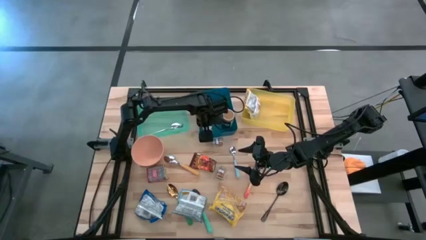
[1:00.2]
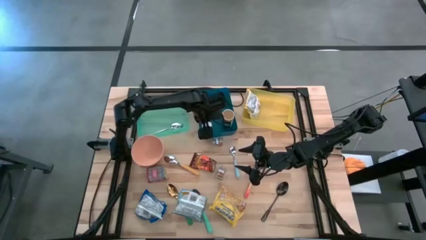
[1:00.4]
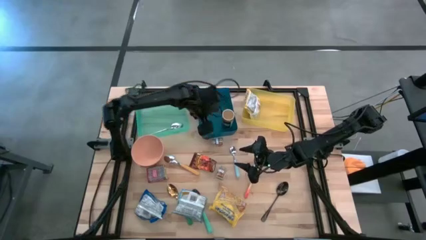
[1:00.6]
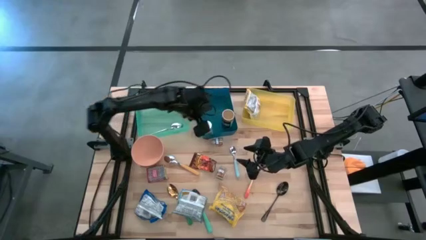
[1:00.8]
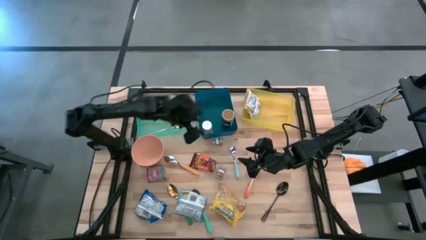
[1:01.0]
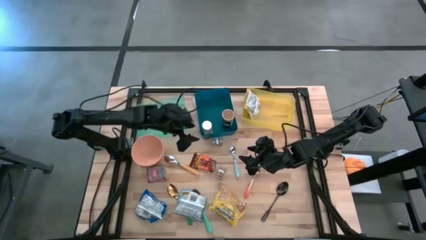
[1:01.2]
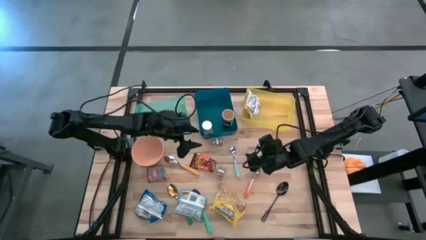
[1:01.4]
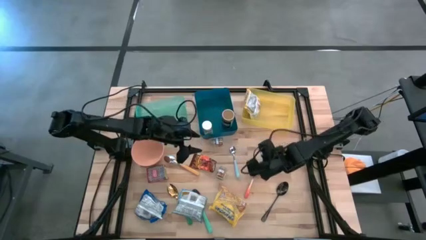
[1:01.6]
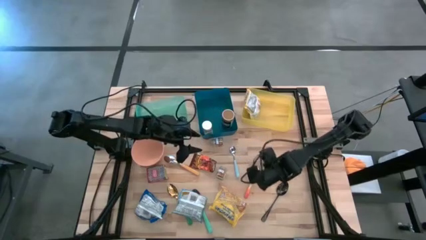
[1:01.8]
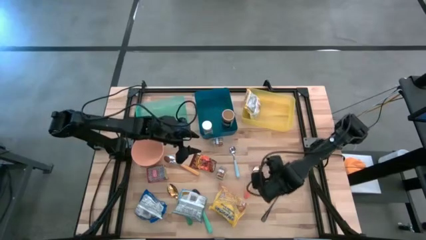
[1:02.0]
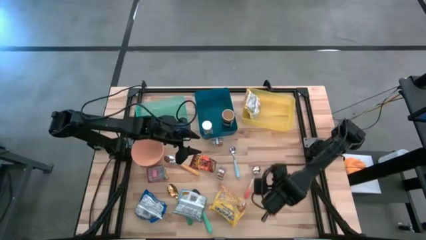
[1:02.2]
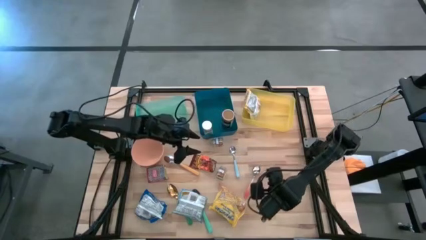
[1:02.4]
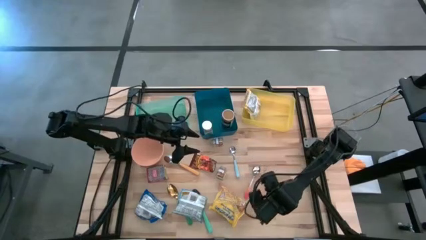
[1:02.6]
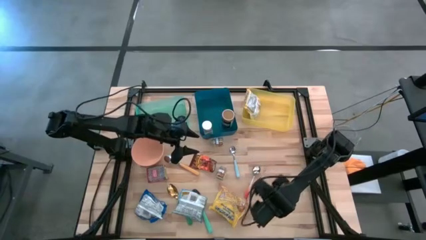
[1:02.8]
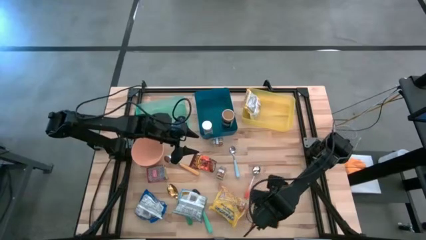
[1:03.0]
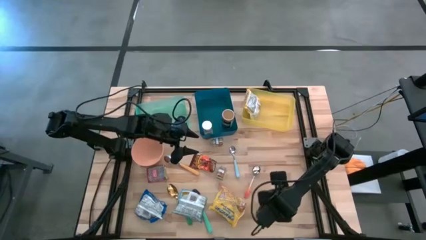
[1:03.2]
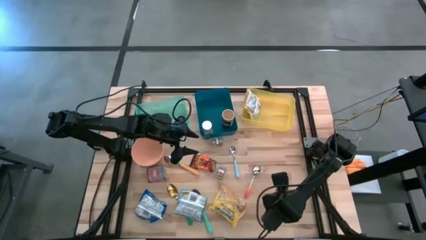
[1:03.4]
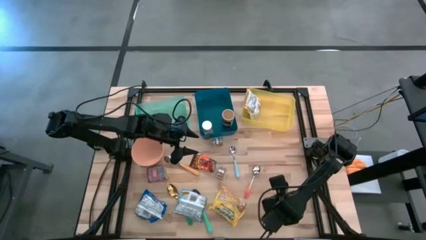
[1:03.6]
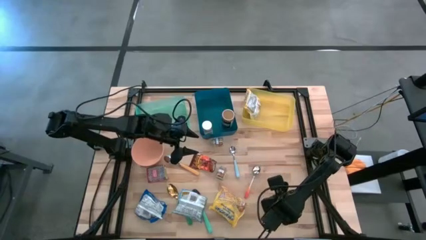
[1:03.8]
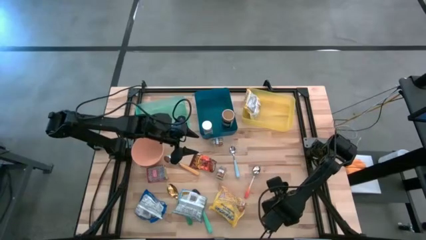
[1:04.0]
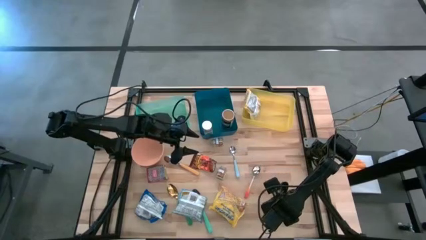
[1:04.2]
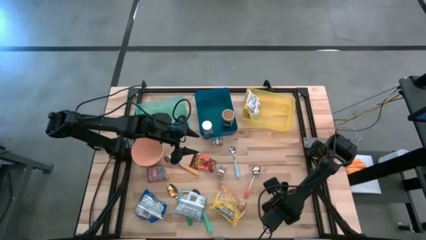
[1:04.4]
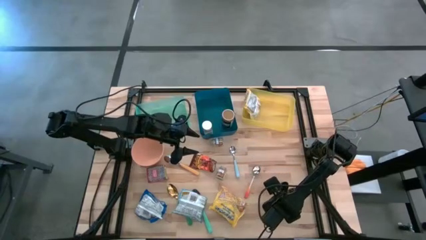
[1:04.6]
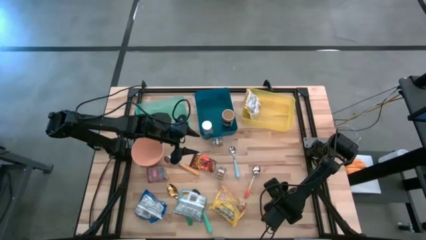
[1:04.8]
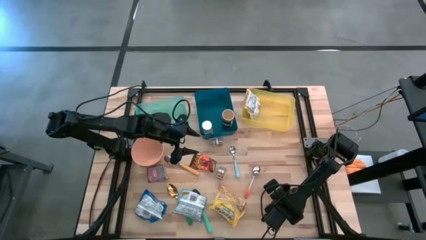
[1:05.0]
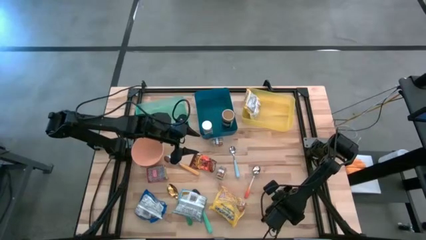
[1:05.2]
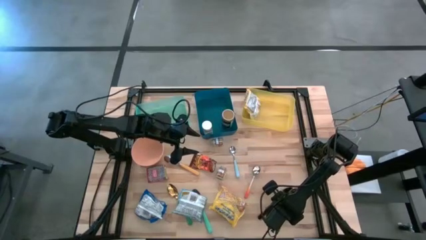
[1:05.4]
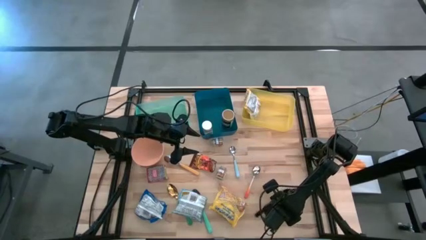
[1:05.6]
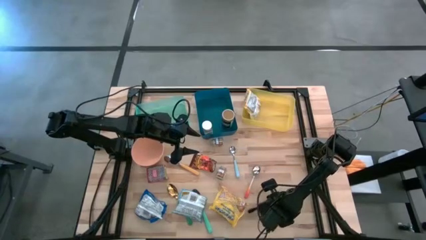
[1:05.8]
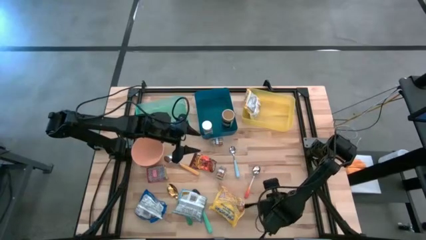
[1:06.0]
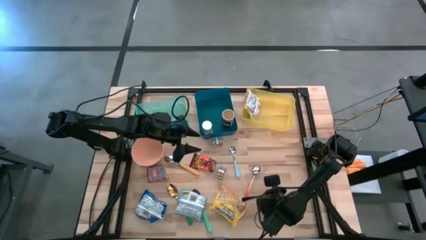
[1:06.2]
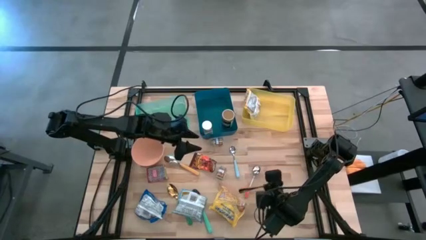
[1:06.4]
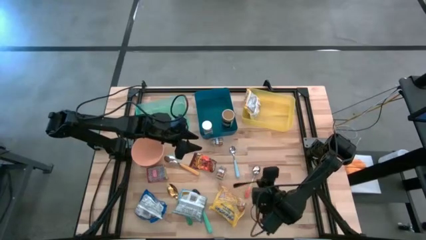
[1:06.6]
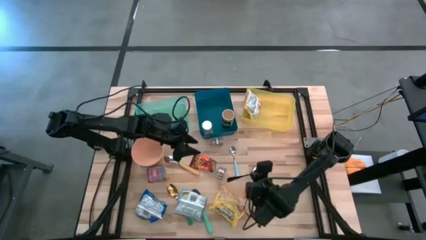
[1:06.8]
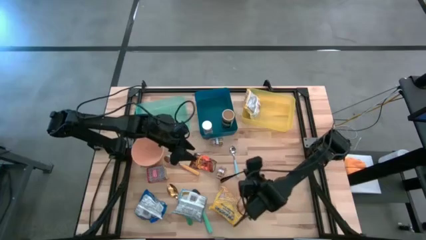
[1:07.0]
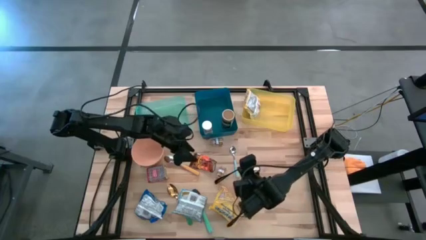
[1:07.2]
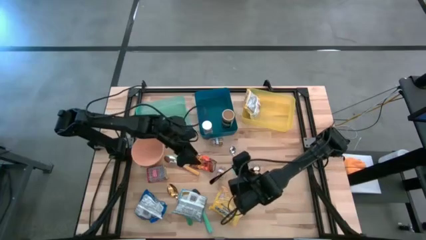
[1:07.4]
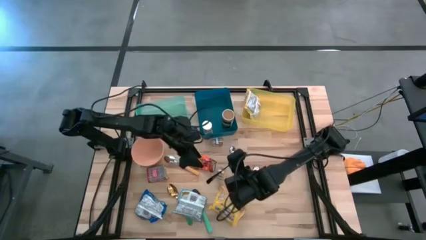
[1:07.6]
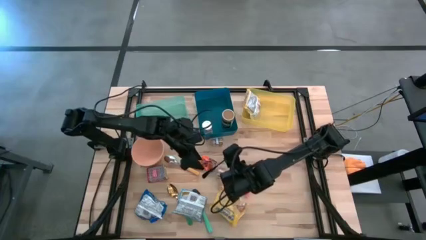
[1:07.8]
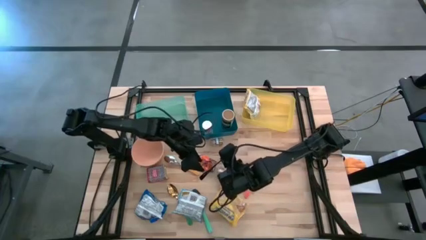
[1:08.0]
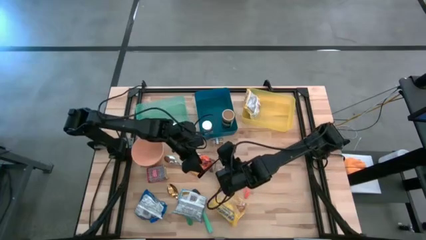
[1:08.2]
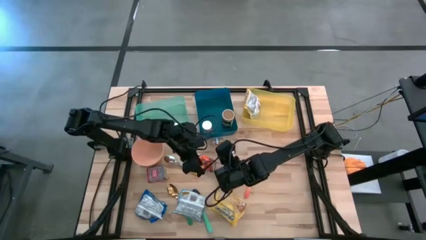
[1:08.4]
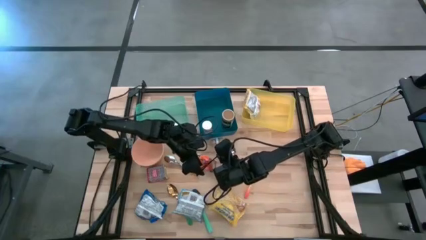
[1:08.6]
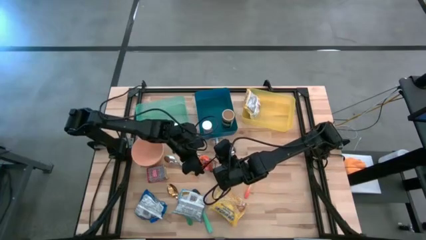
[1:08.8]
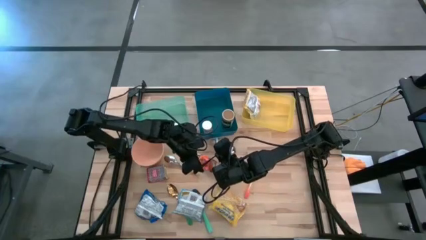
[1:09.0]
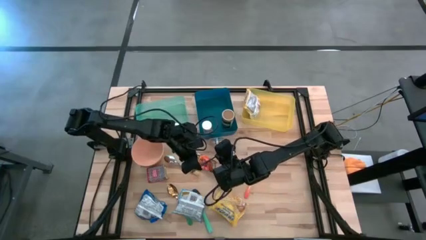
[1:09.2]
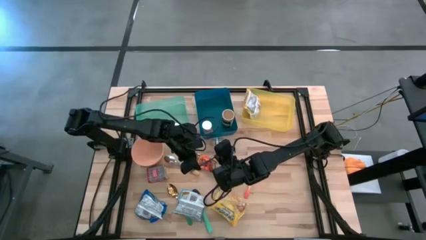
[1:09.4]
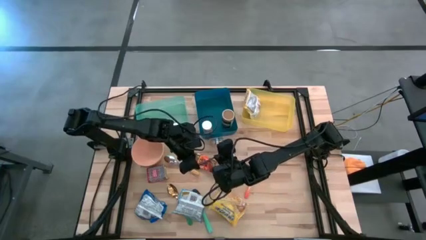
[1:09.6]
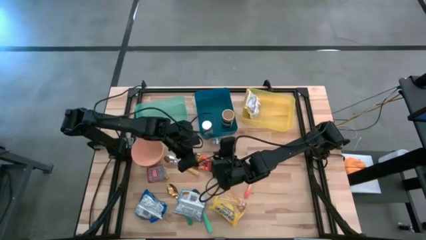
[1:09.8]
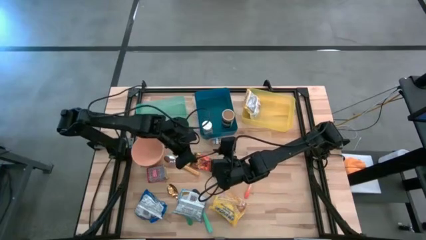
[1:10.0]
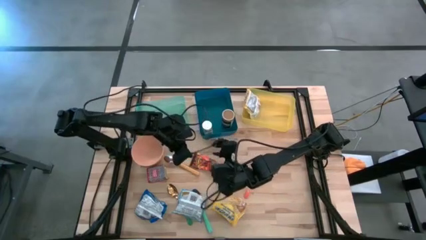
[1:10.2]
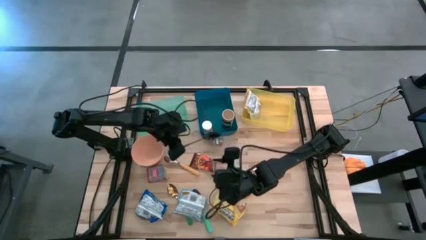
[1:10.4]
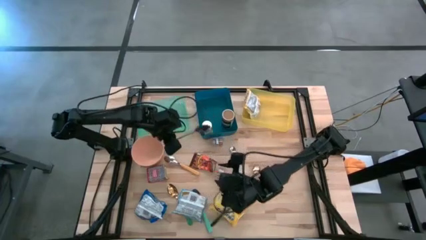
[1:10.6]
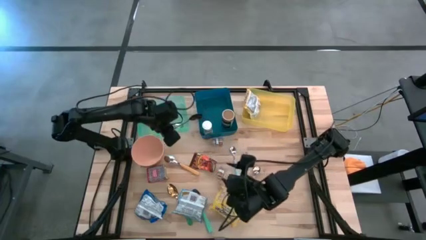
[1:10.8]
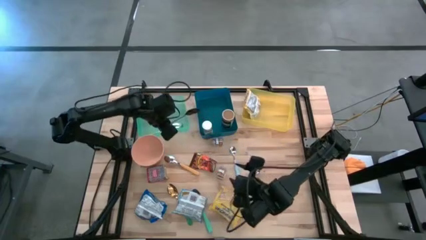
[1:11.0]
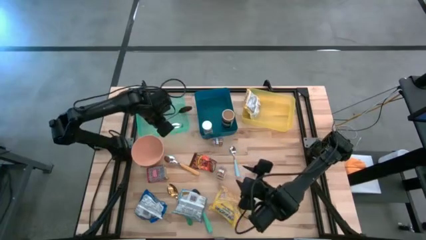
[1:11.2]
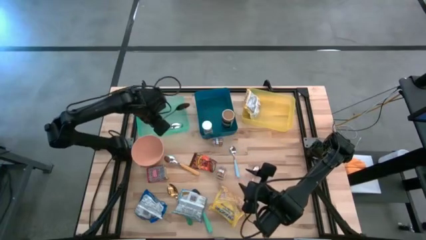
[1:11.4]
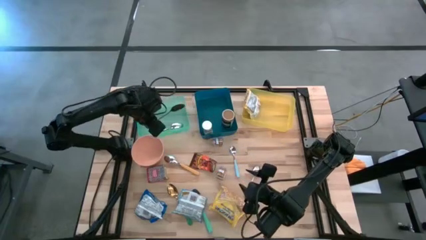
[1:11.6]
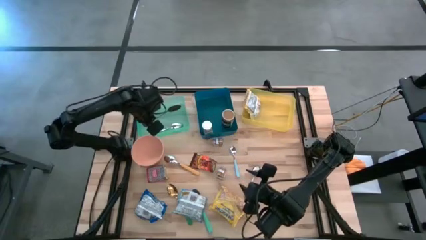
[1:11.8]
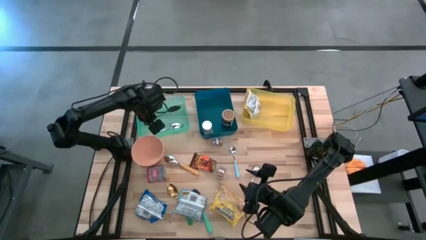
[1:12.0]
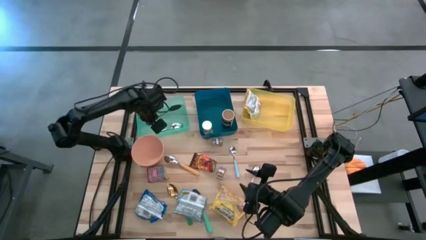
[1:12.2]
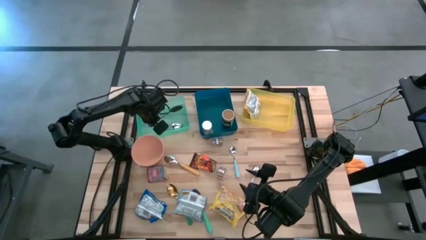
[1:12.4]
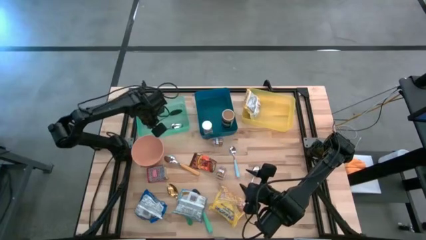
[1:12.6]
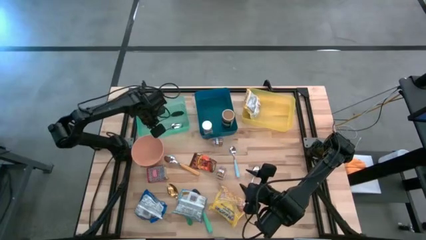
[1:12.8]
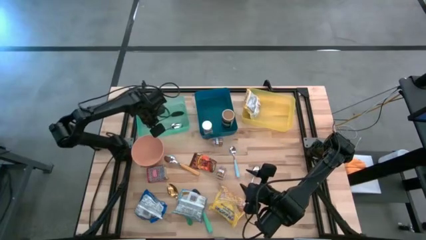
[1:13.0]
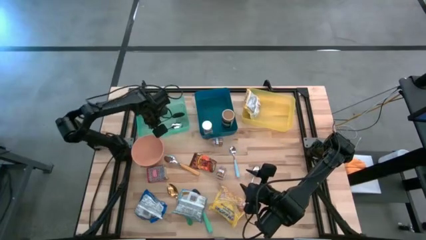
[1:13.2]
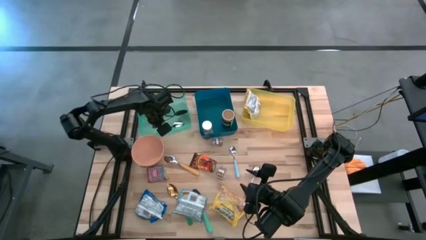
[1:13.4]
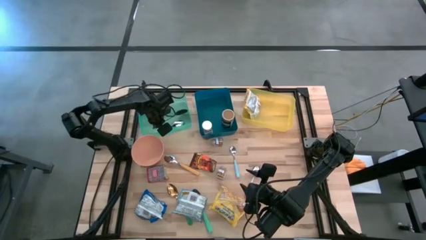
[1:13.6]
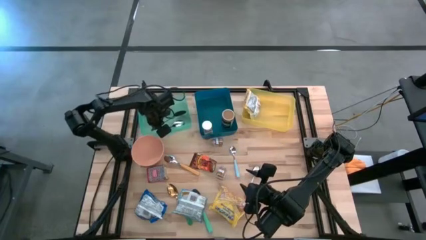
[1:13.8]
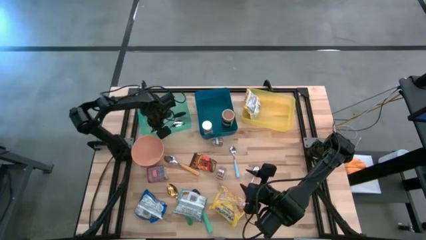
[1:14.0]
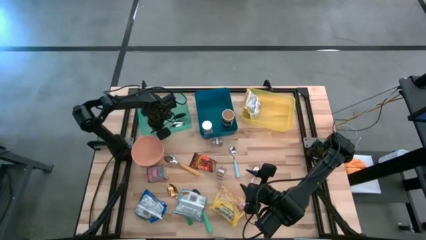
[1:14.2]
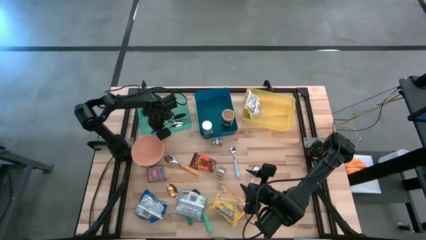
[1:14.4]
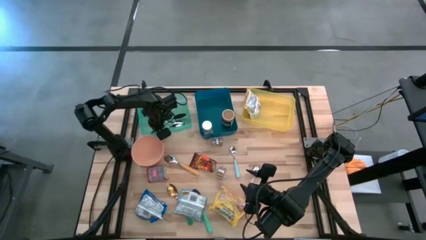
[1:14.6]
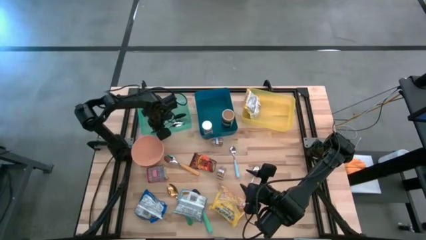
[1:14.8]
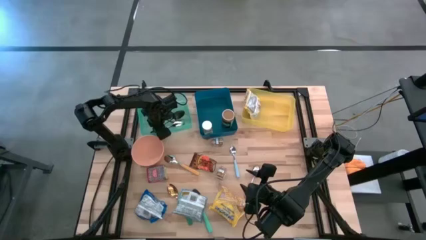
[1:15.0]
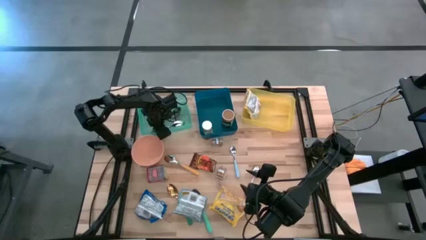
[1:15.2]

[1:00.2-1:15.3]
Put the black spoon into the green bin
